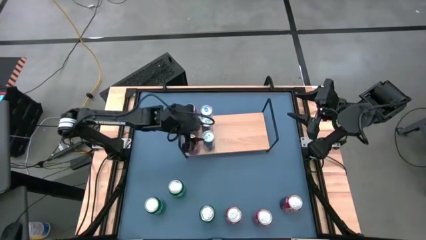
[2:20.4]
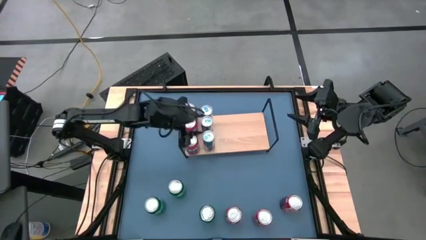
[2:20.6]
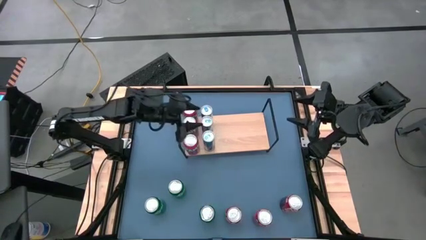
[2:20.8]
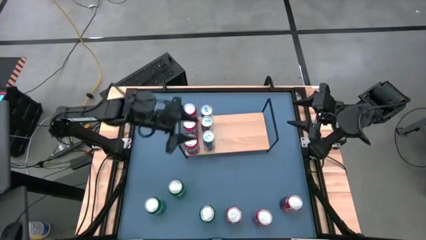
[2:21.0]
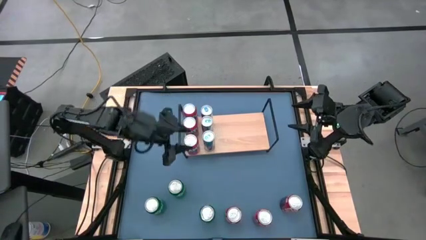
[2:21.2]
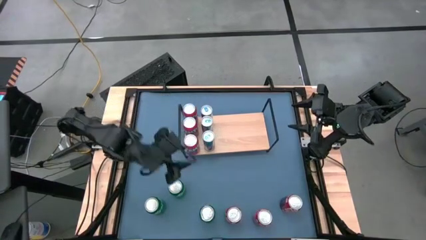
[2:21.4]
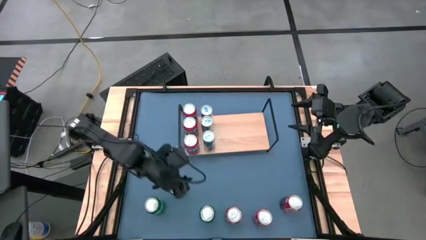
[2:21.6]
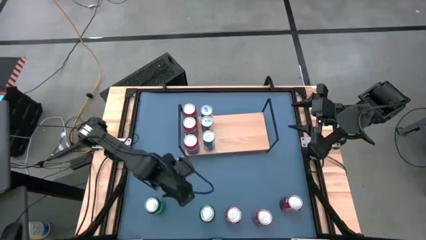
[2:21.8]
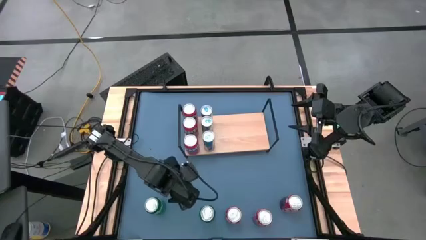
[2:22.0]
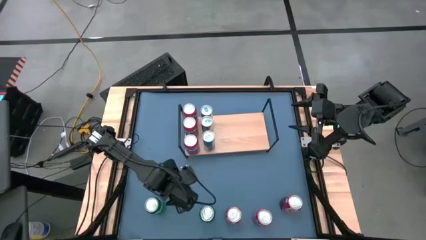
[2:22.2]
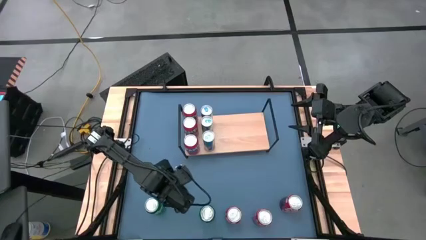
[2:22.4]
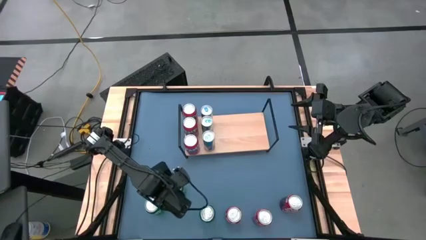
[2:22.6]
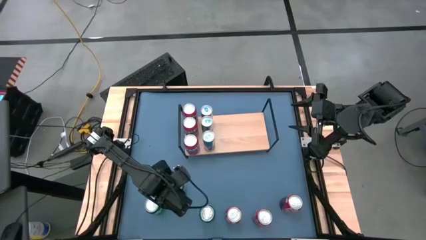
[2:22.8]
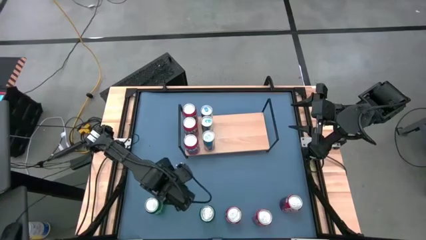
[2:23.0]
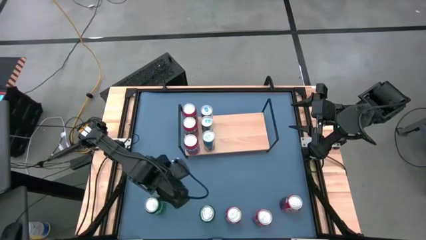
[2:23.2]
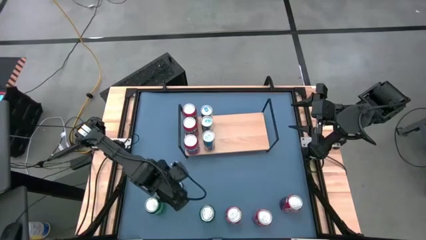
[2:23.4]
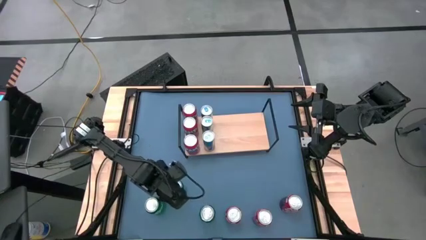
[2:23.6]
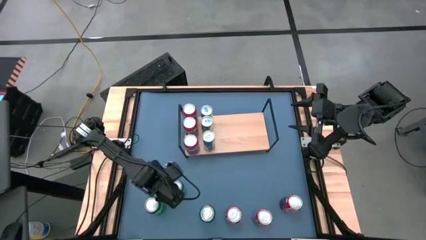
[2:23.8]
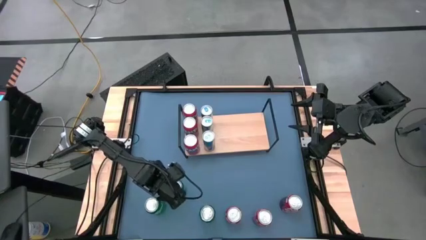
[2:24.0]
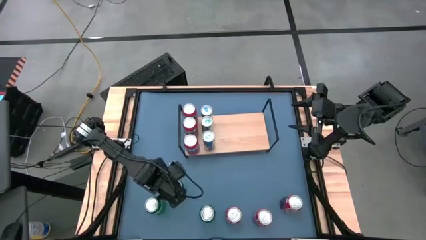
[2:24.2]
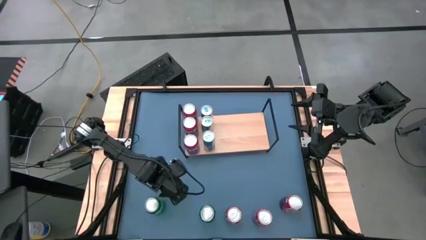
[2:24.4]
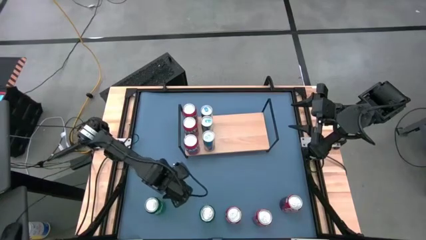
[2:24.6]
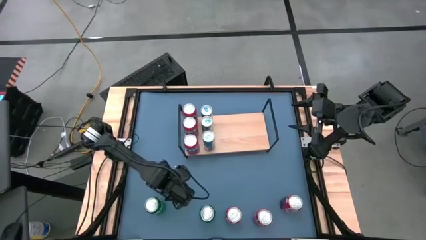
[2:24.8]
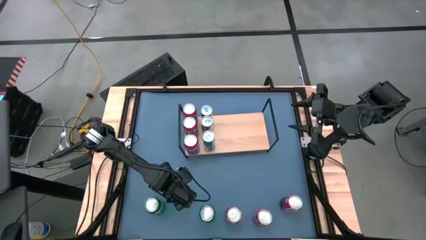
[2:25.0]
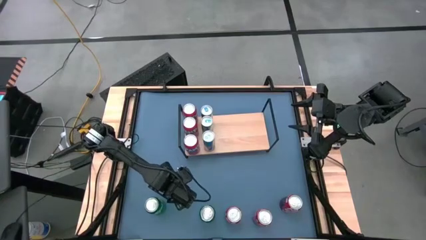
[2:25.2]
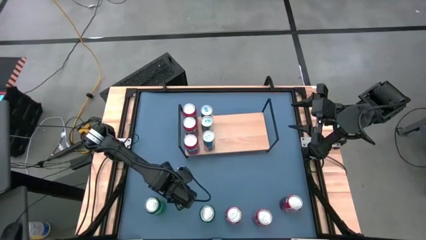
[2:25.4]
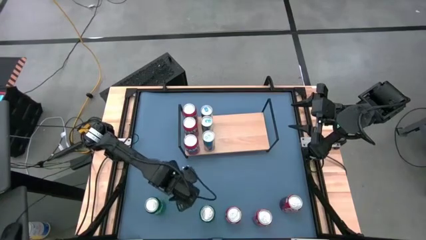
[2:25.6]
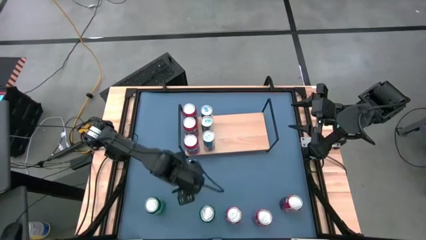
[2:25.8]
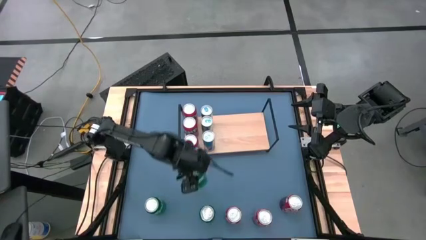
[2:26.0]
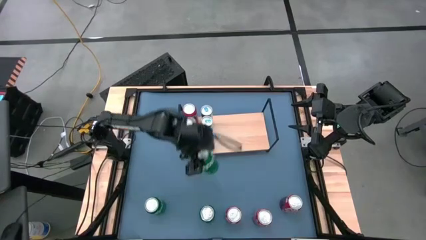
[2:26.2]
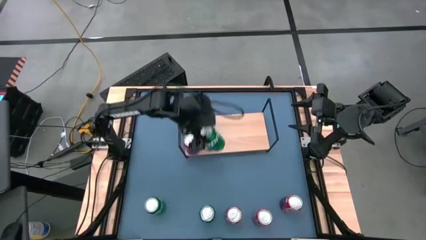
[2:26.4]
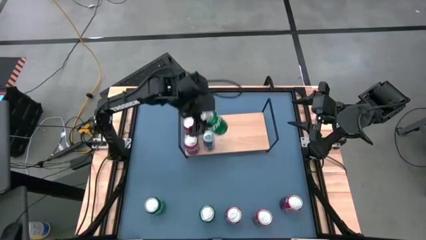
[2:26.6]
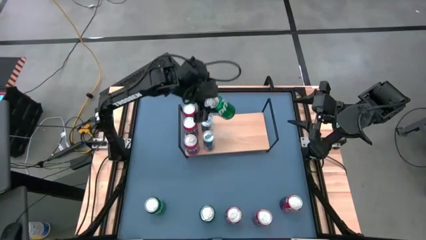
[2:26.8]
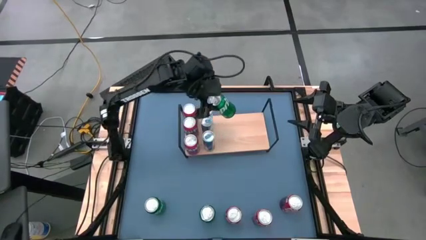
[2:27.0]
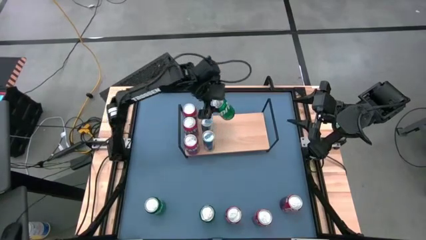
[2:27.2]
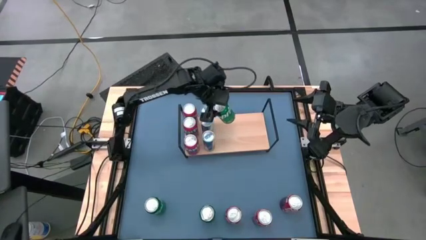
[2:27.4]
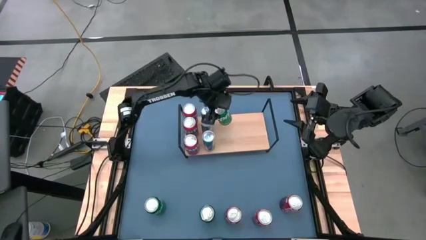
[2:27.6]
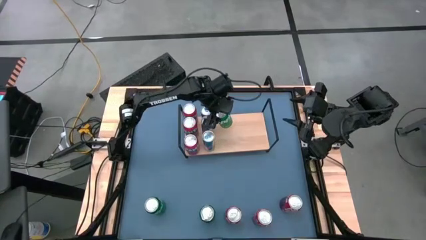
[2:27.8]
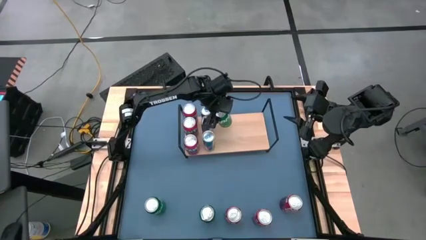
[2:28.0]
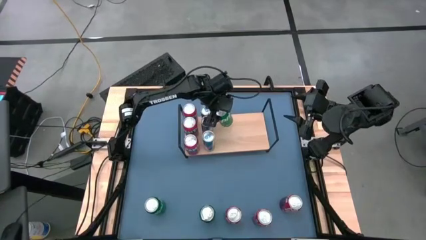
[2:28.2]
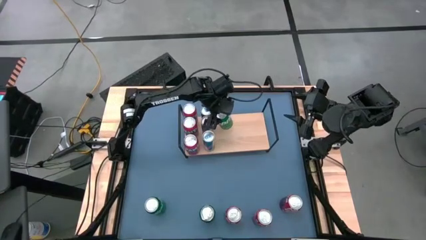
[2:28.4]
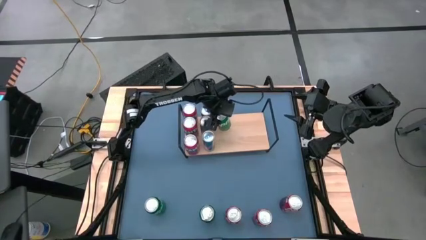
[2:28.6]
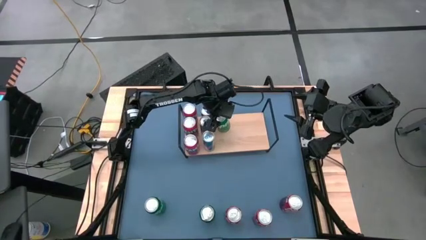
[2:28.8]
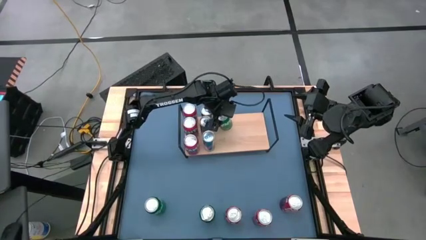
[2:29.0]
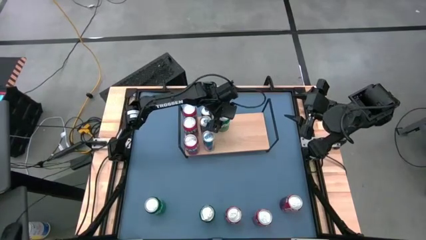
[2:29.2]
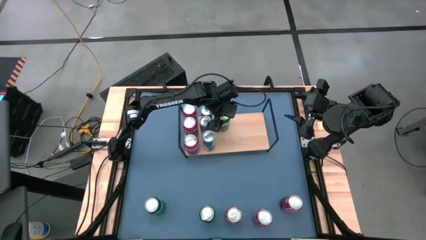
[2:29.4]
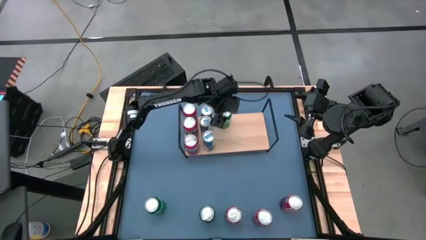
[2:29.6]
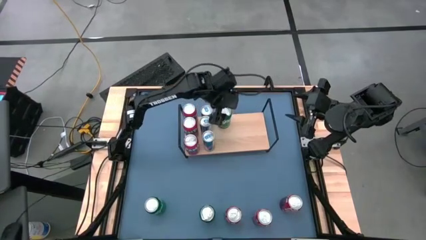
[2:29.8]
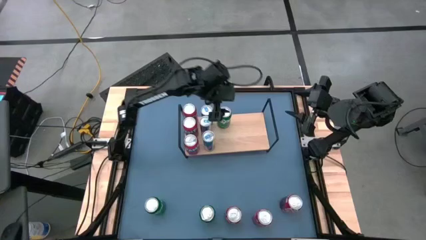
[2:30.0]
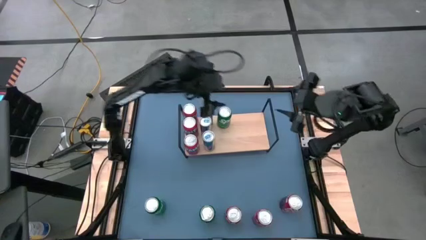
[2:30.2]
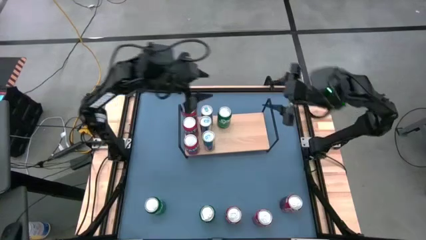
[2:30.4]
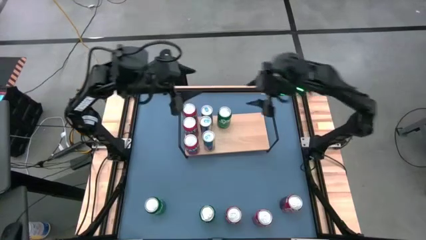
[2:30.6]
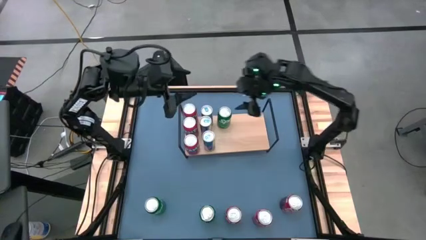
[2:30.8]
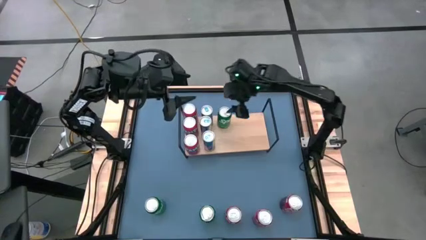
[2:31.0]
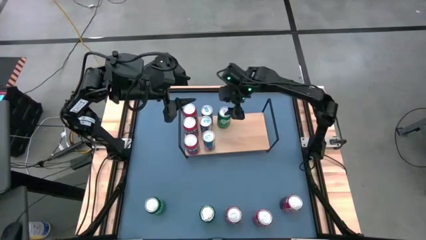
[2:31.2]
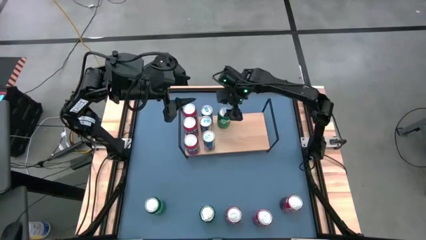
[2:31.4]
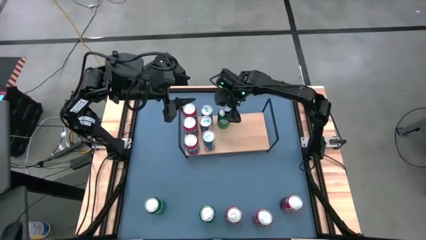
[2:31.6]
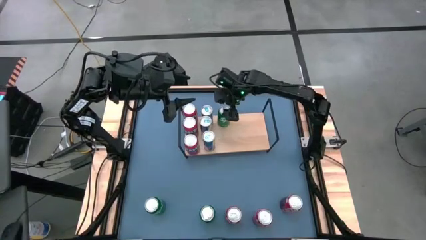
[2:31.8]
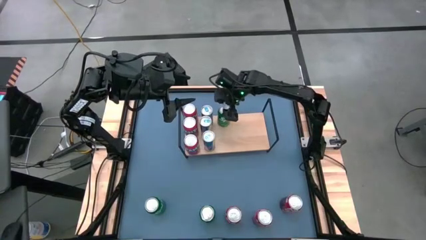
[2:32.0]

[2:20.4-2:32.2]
Task: Place canned beverage on shelf
Put the green soda can on the shelf
